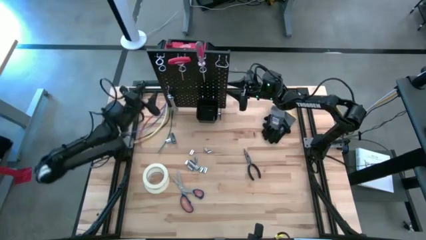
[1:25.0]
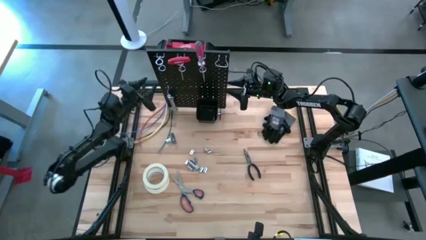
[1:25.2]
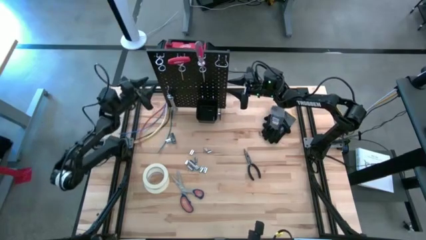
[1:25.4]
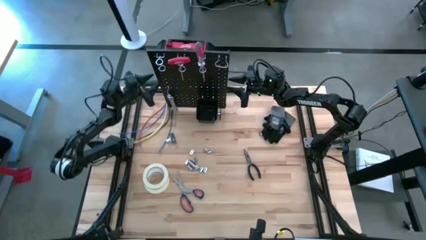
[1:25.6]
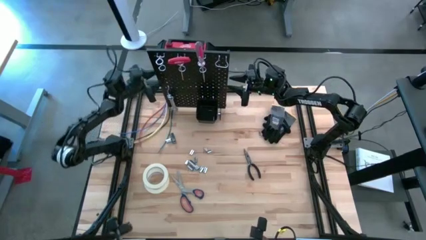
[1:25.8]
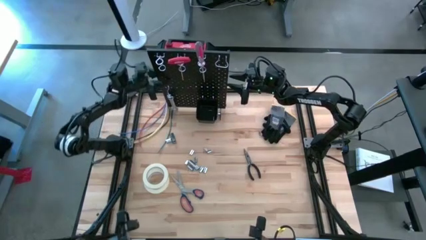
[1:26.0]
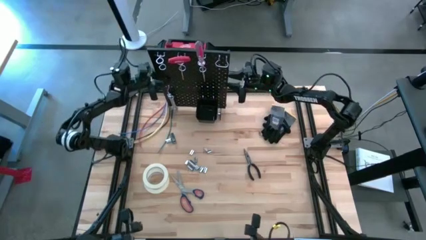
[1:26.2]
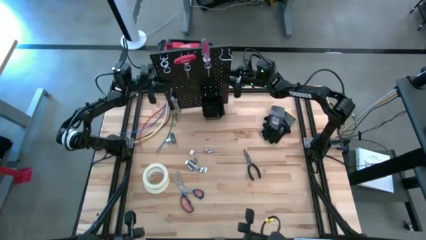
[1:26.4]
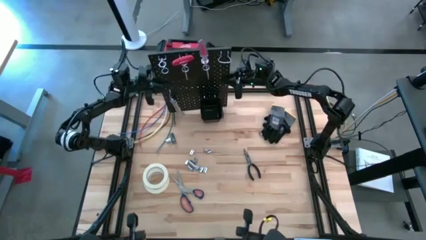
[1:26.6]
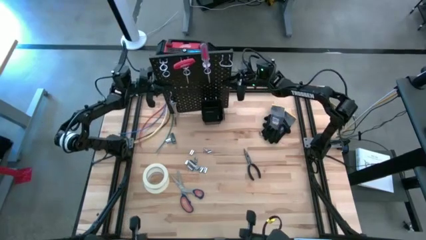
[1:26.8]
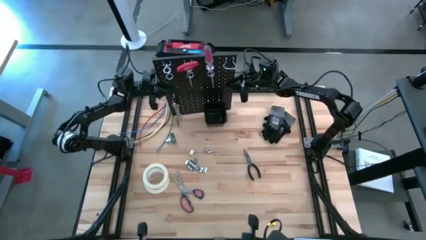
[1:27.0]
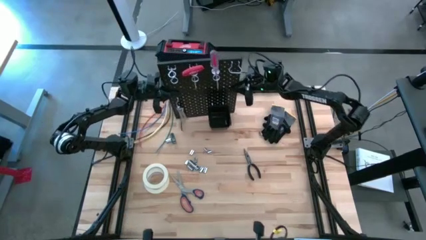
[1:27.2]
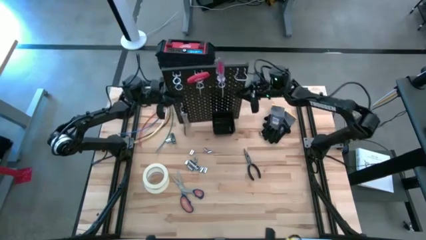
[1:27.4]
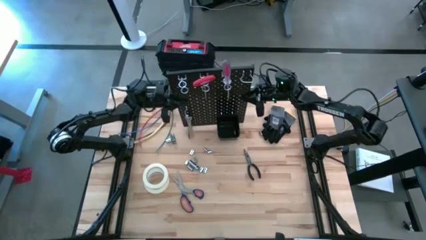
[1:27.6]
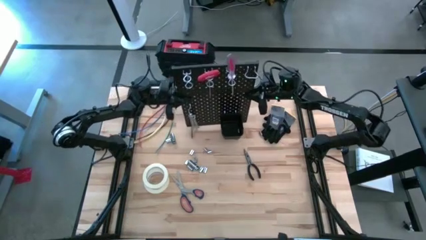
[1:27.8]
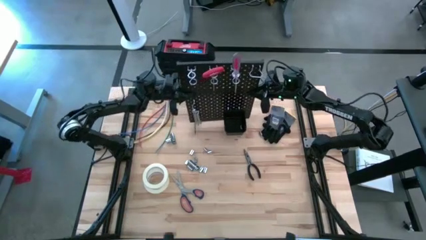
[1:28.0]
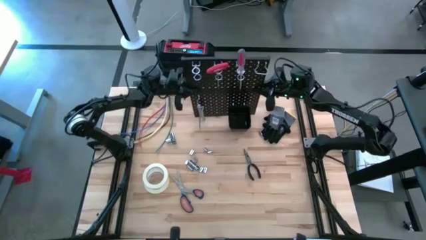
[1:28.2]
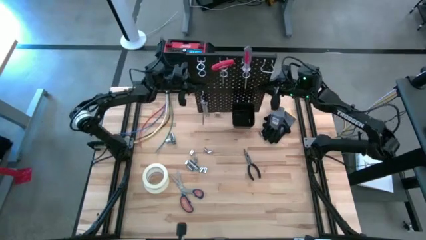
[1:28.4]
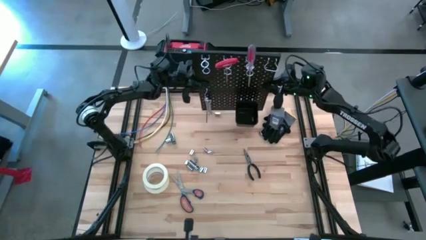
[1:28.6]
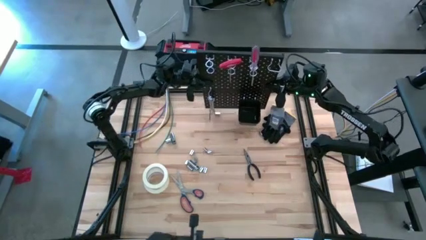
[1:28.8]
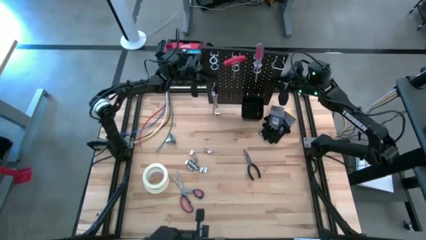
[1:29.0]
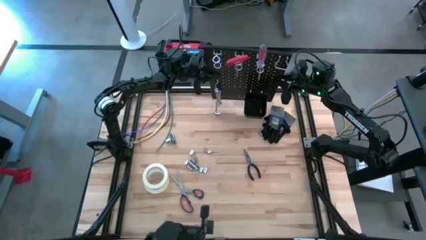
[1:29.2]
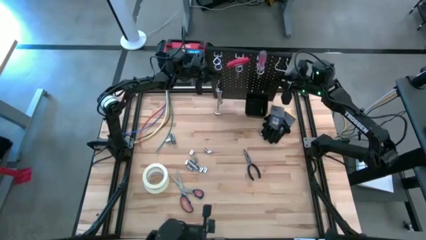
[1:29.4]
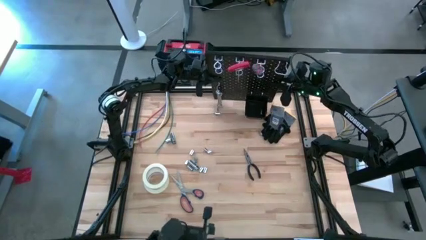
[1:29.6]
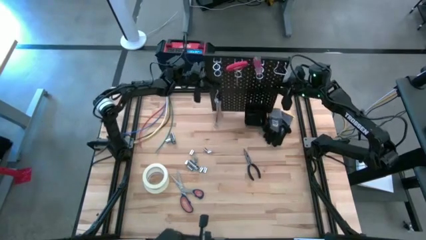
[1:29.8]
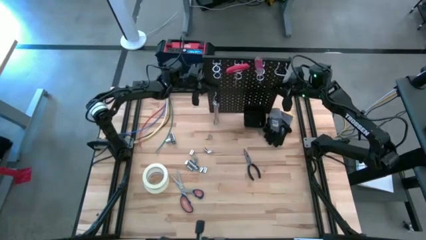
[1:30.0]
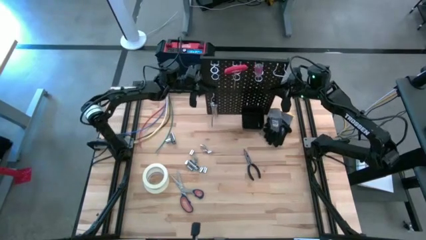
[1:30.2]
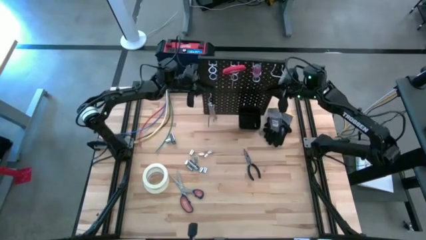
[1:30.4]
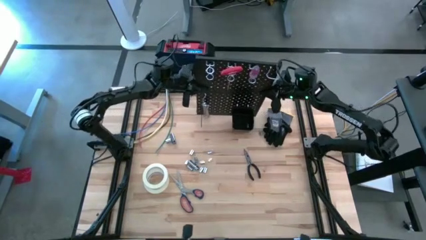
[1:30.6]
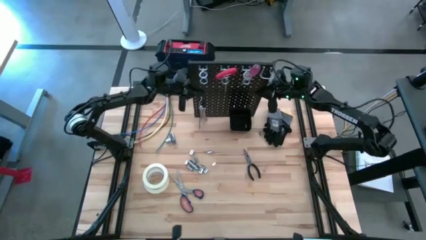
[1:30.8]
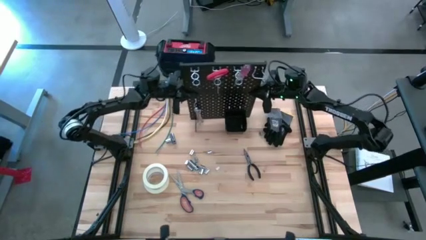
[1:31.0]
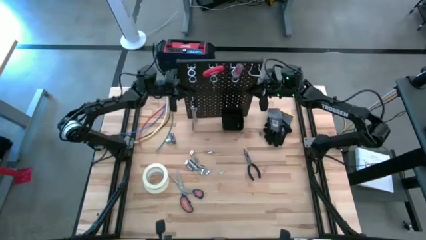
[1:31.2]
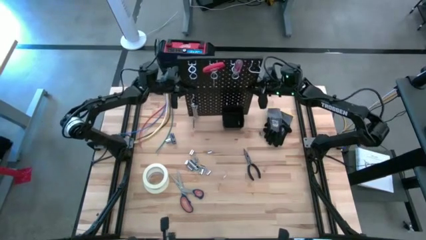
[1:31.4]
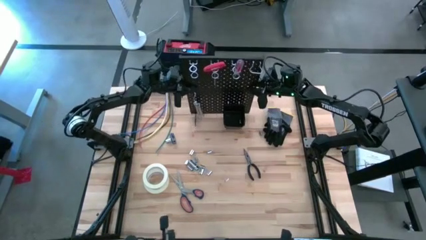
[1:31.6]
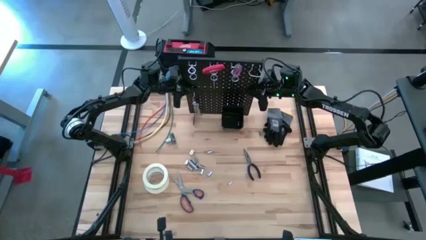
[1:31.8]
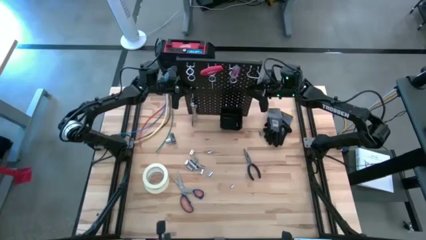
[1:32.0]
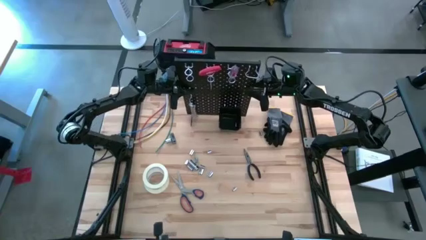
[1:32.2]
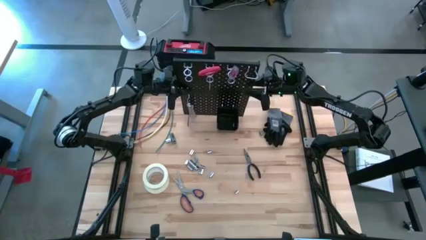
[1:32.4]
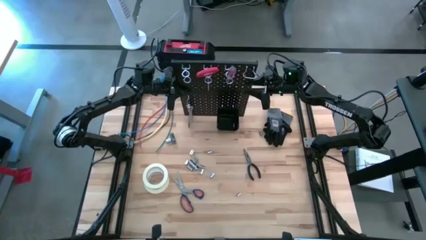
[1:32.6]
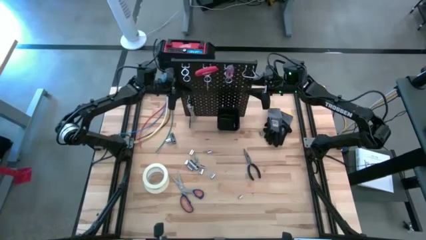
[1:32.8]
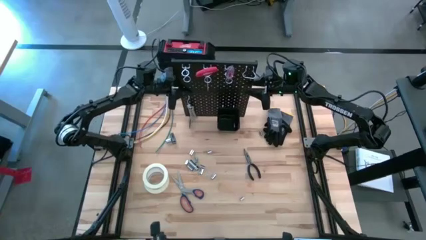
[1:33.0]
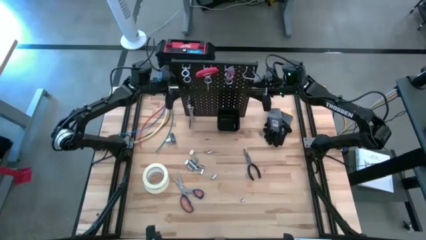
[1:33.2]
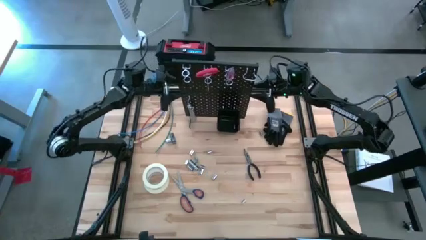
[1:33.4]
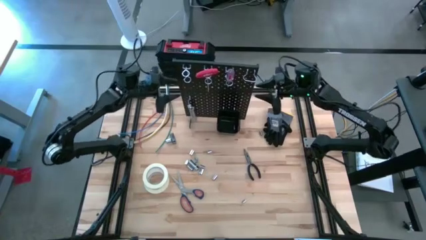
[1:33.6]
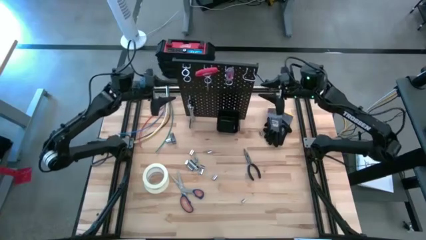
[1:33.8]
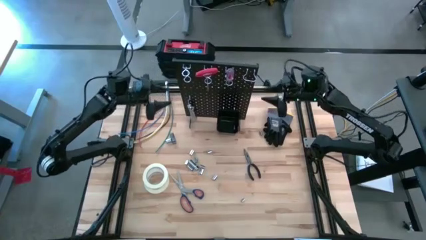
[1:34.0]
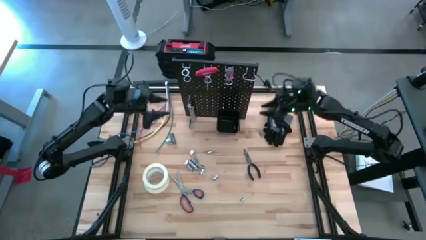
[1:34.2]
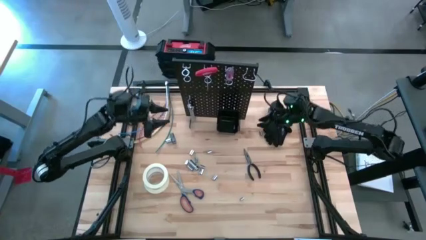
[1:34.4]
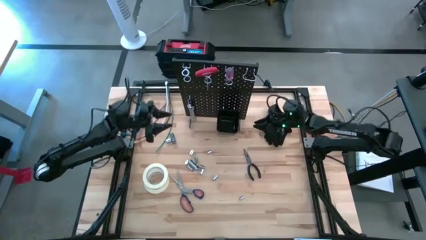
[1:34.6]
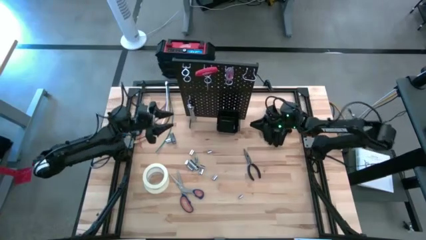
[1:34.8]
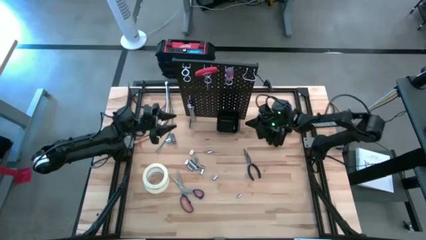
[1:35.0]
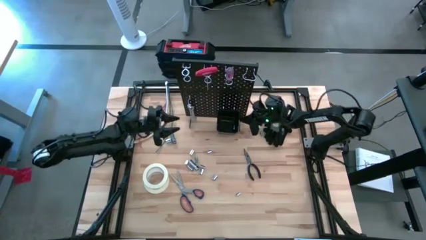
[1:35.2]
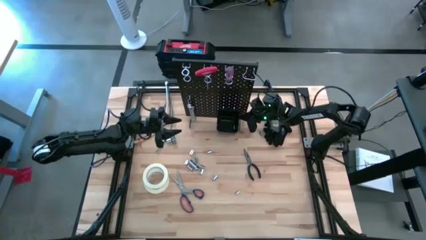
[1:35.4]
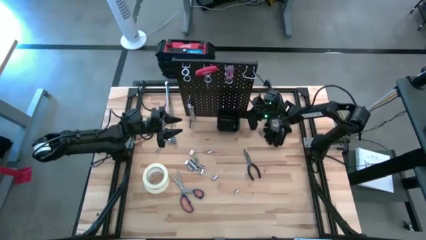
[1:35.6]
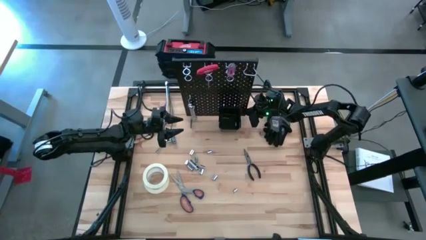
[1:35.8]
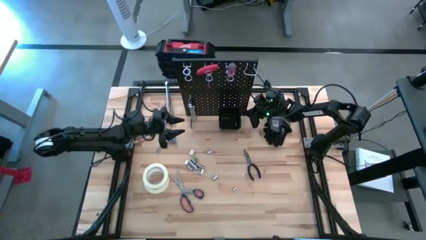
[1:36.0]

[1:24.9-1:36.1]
Task: Hang tools onto peg board
Adjust the peg board

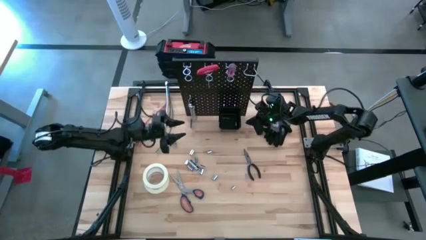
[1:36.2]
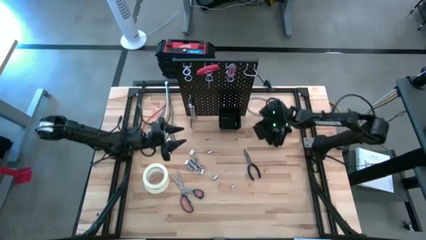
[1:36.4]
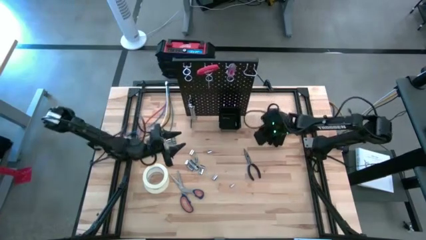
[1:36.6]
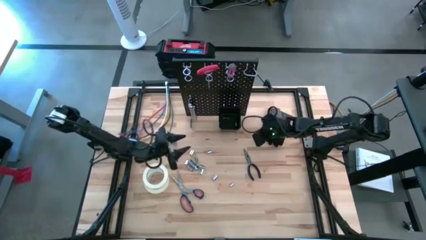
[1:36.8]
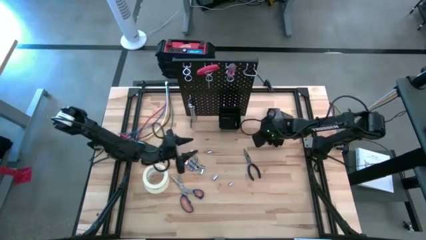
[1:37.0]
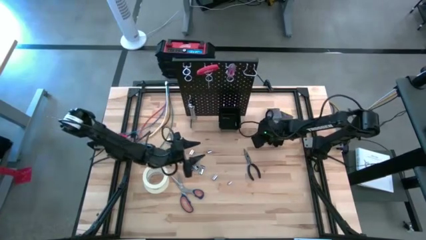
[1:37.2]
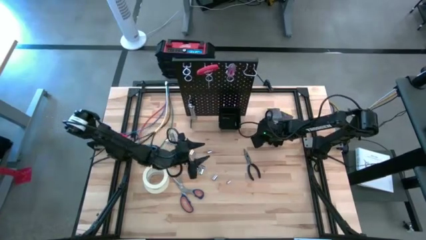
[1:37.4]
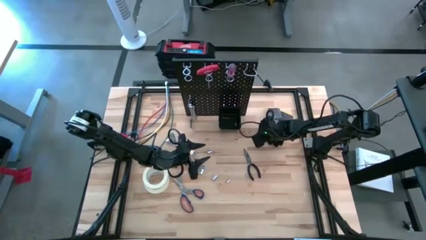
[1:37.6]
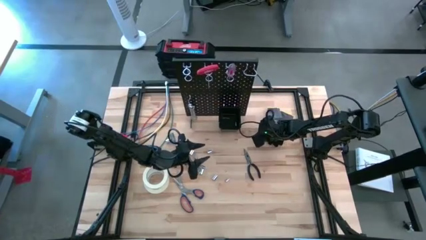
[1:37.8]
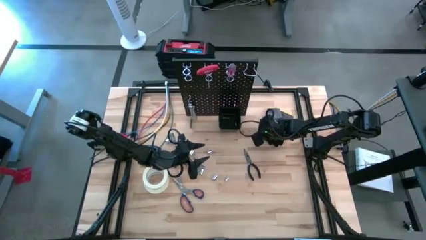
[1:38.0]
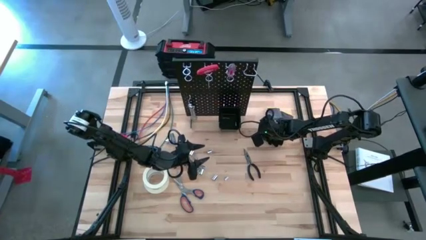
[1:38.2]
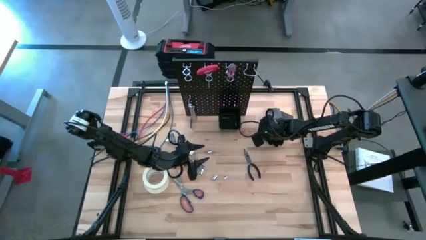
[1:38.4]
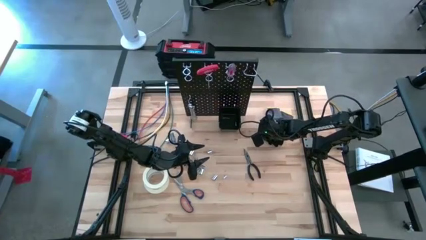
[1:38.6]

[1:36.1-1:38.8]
Put the socket into the black bin on the peg board

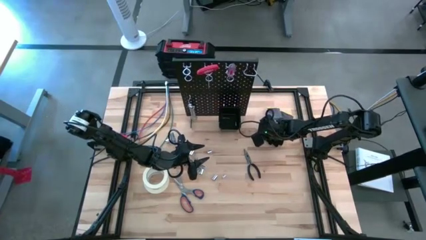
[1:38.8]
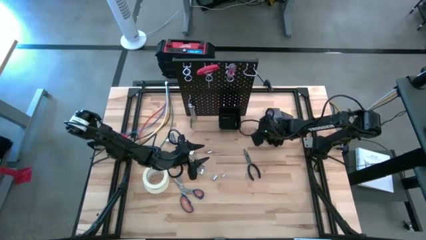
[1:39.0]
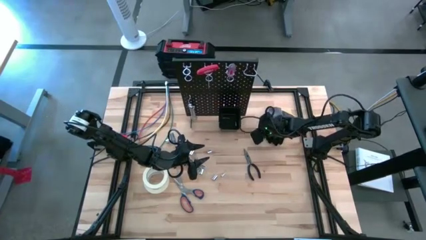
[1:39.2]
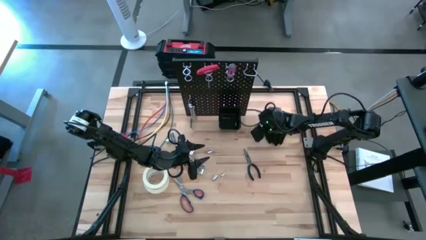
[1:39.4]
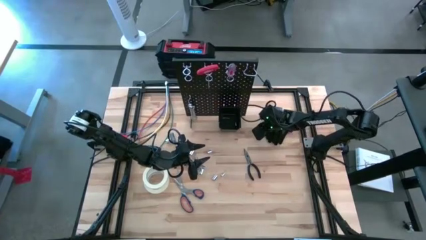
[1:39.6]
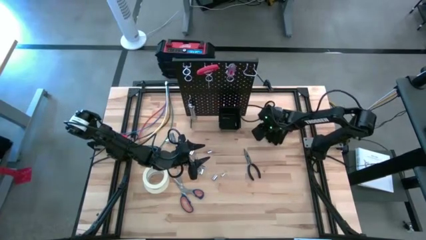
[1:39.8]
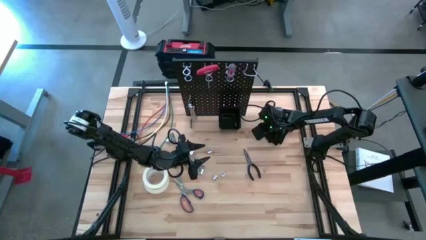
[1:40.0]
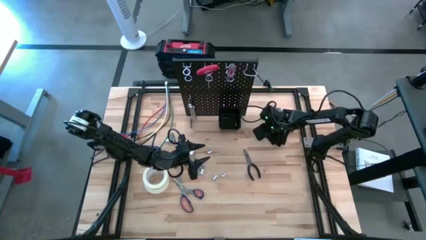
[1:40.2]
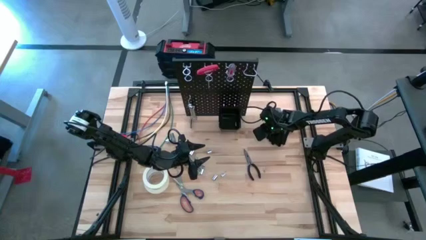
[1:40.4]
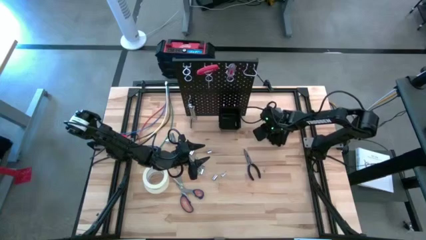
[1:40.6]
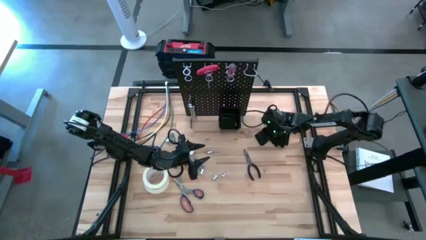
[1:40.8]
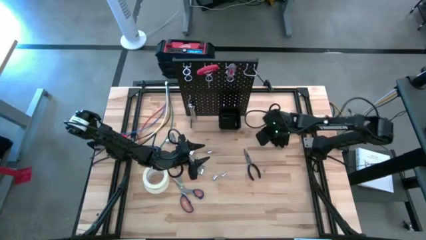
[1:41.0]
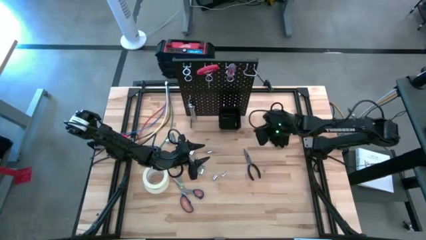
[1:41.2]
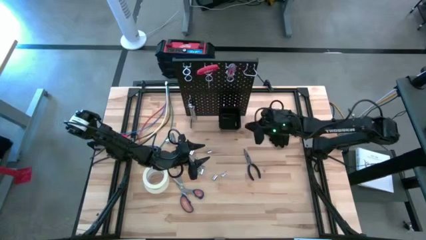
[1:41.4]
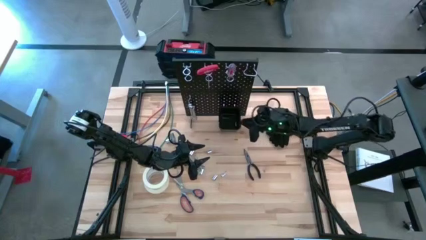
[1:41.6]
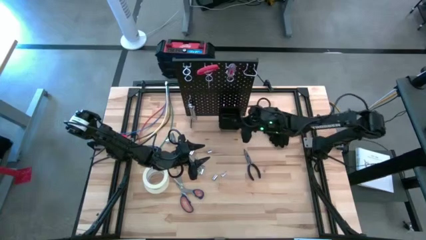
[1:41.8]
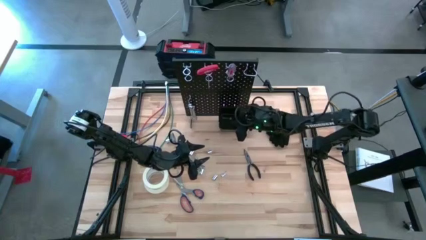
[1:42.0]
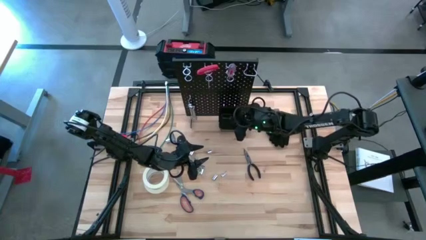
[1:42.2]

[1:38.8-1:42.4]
Put the socket into the black bin on the peg board
